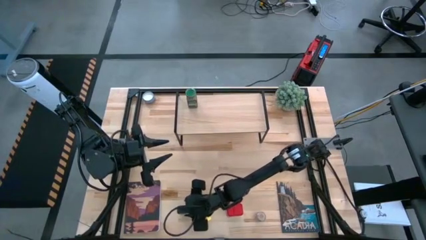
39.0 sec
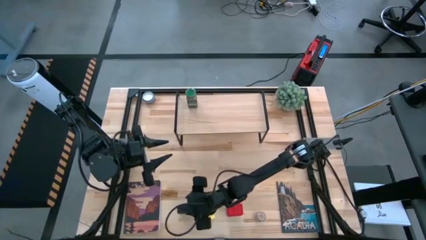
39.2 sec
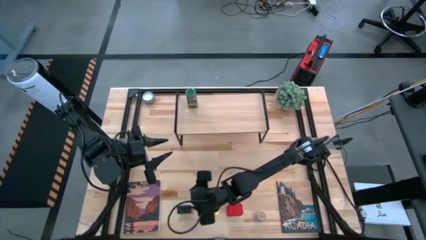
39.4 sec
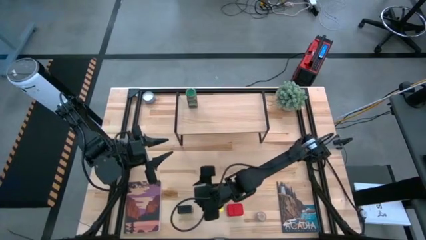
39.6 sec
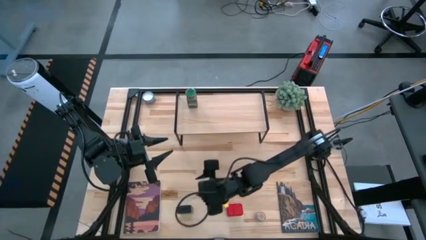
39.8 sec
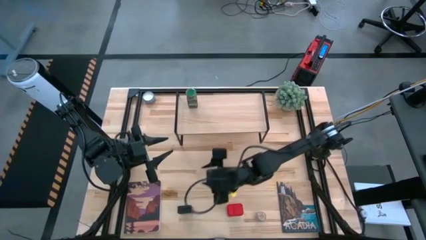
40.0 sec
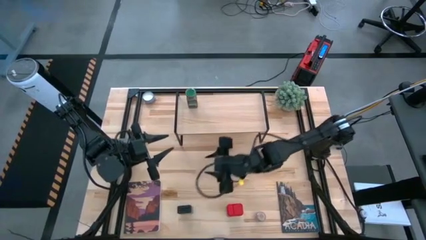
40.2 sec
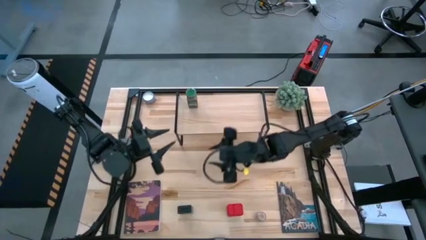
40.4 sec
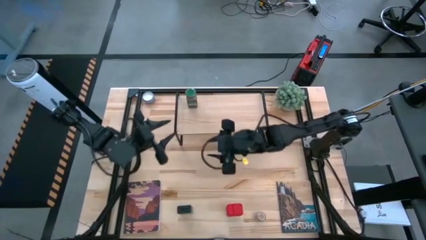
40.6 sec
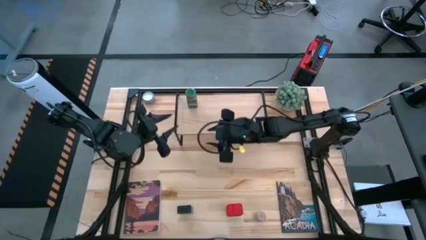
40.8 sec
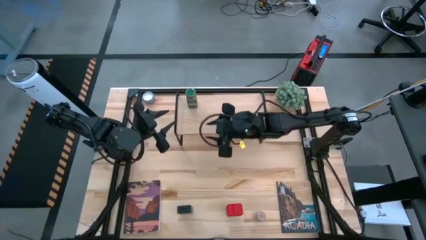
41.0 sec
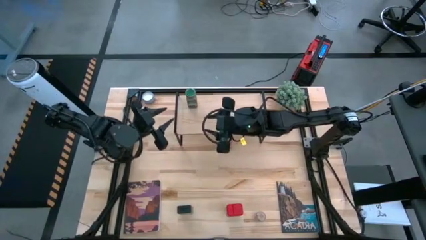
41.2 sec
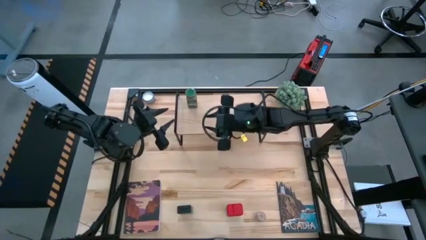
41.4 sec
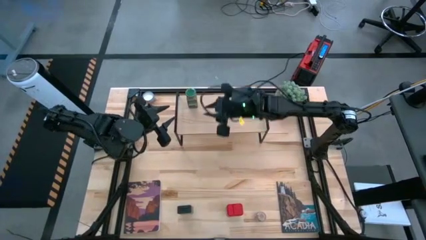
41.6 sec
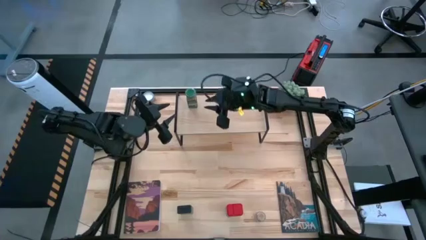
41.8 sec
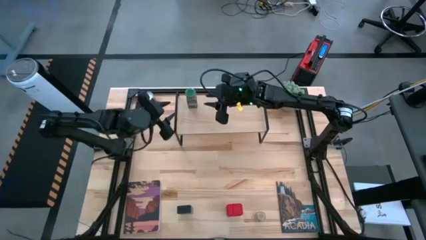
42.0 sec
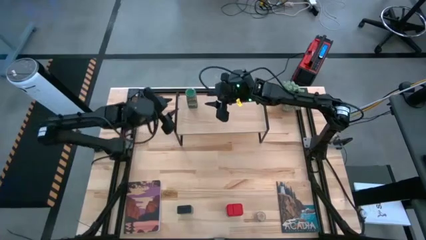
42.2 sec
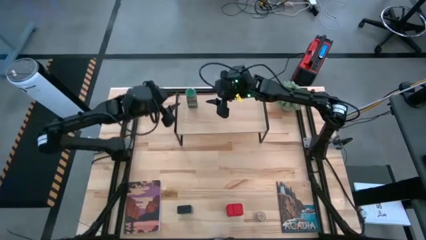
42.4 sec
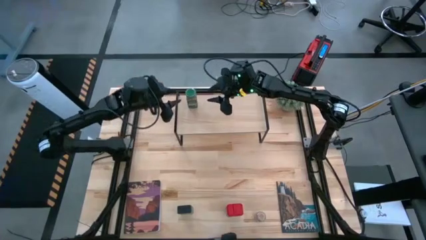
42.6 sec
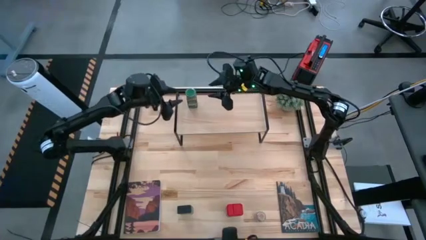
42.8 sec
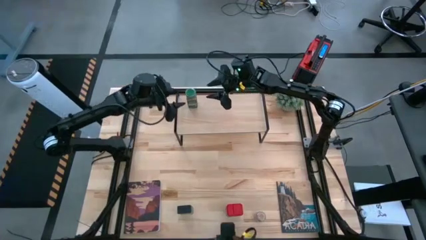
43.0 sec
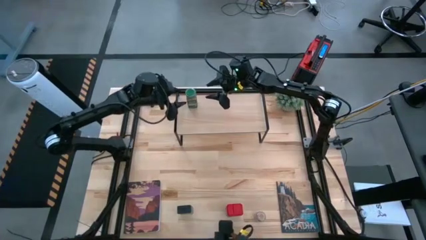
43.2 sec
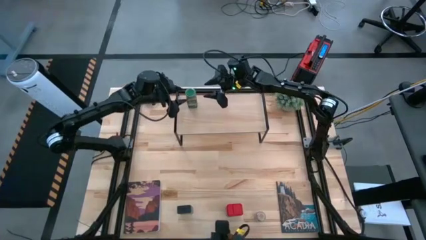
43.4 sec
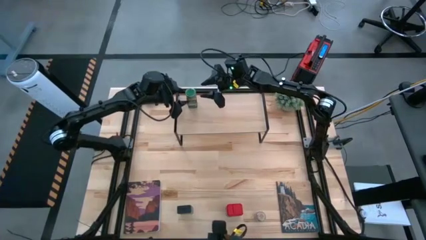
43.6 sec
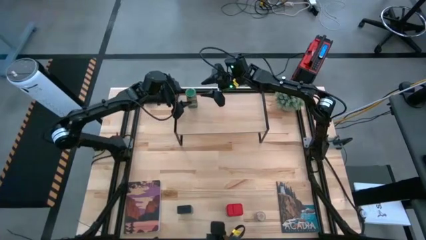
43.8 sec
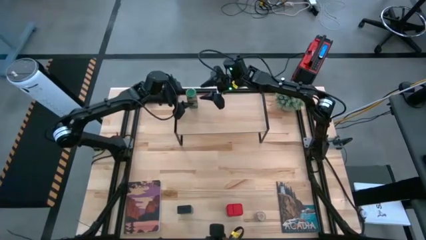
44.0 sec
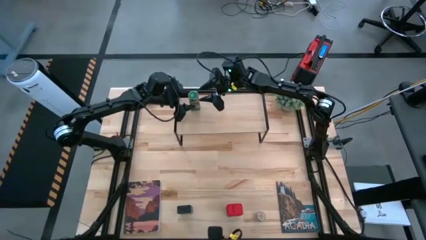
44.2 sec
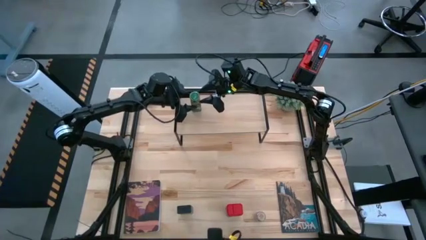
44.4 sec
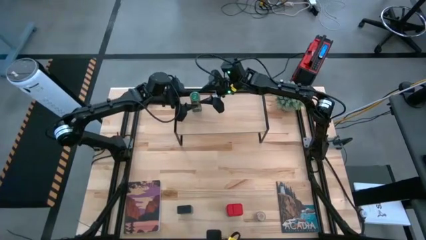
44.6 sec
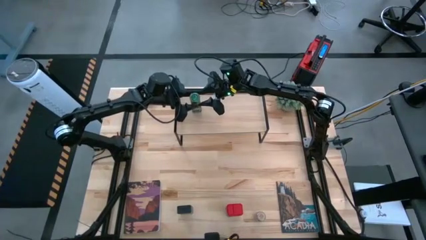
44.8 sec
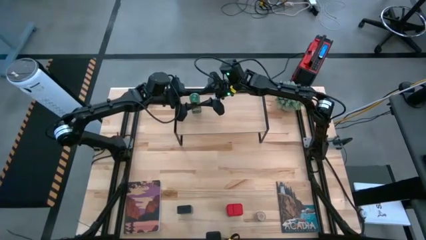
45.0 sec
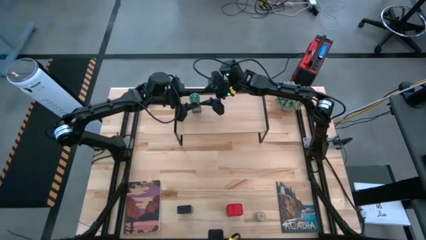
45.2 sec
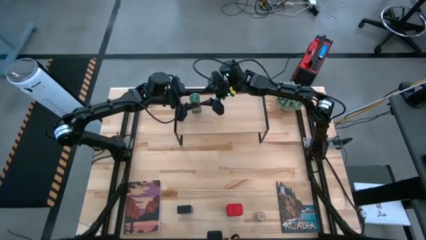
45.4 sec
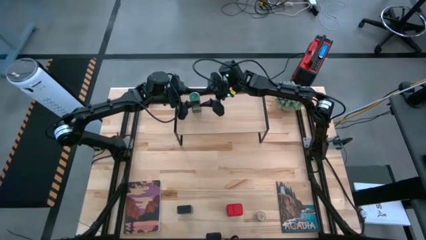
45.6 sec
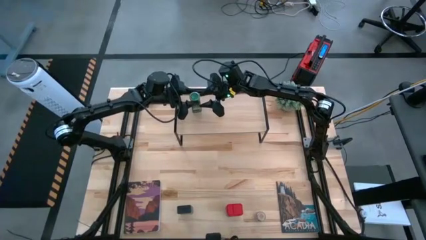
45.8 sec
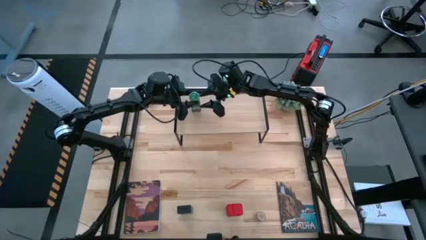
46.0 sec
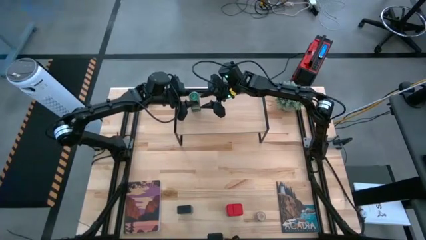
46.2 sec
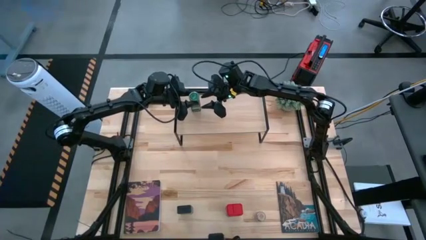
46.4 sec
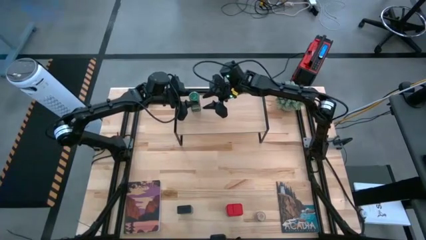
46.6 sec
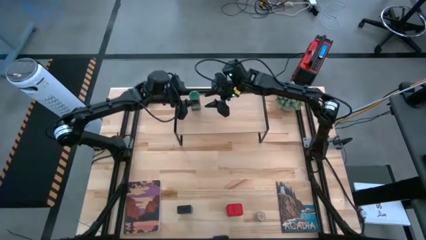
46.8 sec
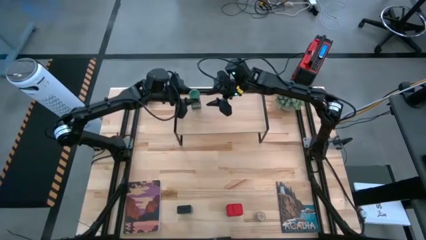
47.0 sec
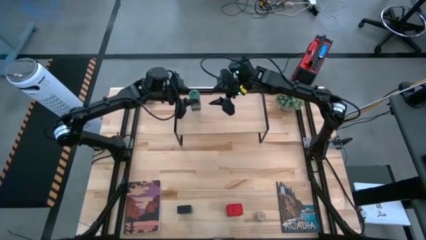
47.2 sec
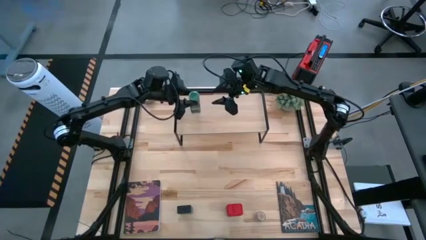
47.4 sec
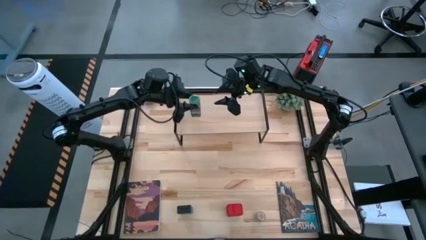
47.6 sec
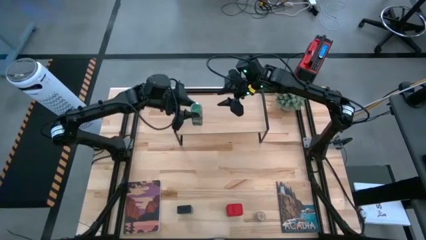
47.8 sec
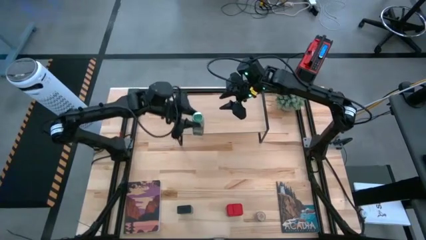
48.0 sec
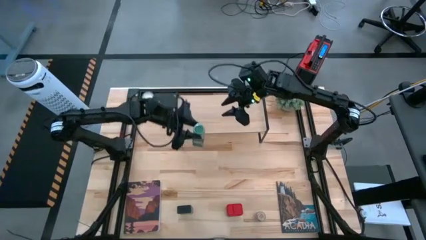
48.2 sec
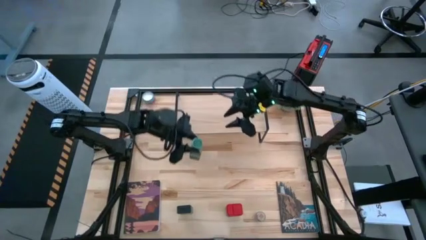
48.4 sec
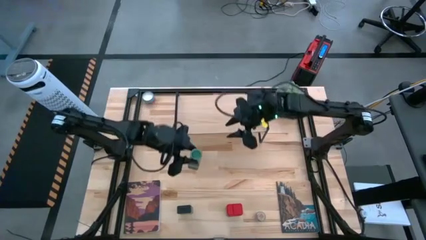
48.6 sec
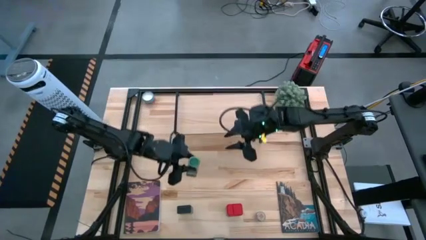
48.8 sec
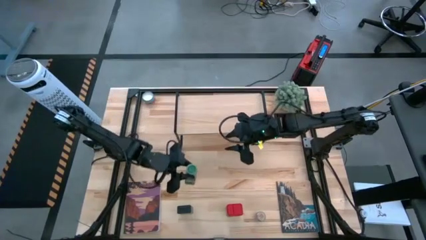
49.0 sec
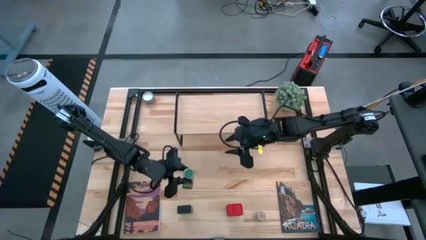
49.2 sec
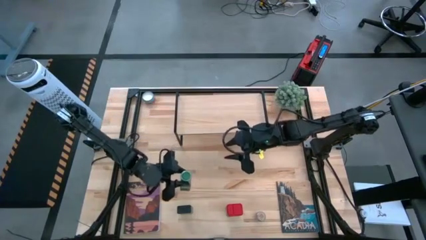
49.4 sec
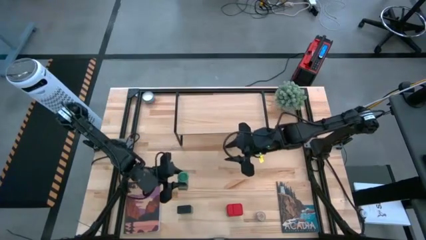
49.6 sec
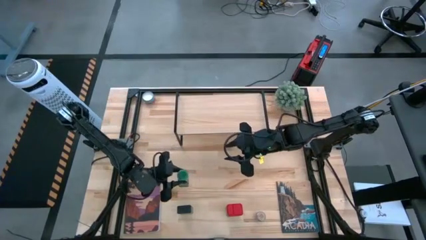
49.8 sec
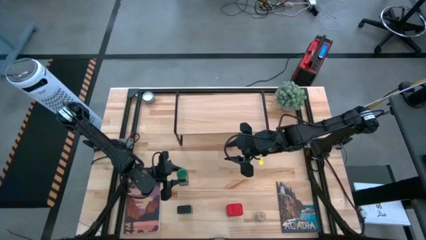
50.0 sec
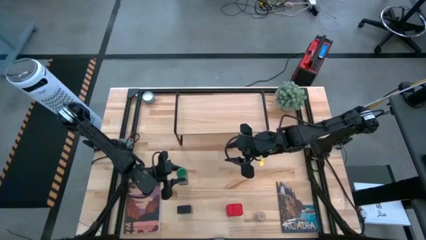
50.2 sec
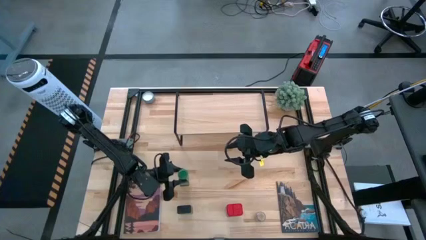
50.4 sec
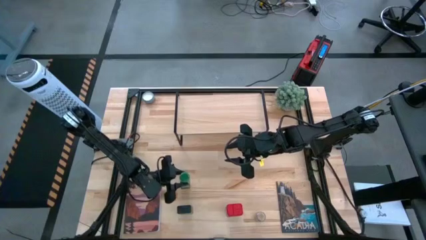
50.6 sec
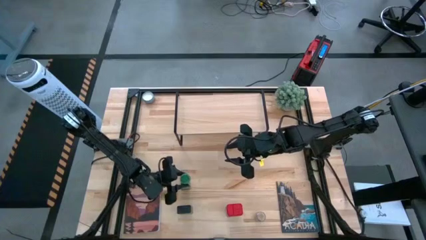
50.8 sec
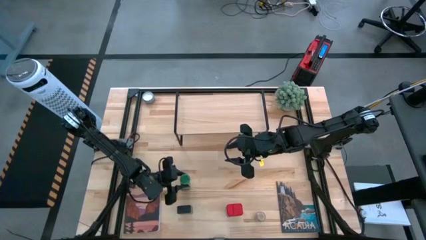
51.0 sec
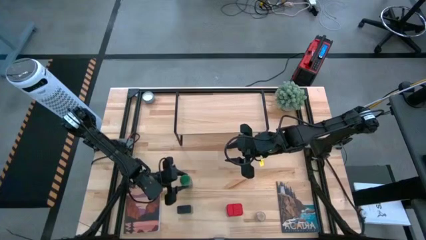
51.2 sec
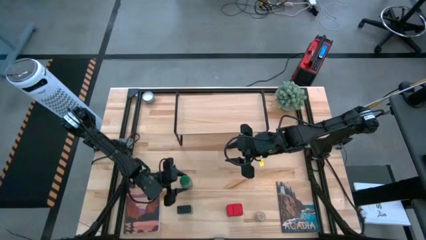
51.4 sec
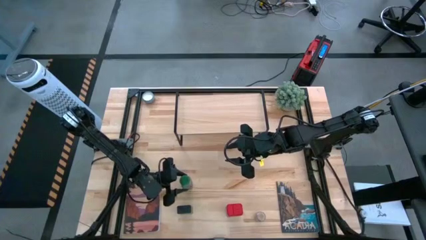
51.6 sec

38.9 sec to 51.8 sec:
Task: Shelf spices
Remove the green seasoning bottle from the shelf

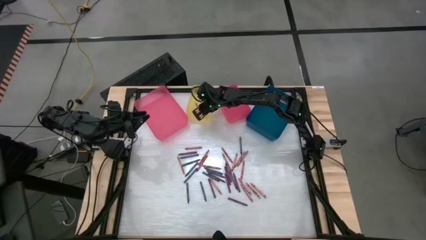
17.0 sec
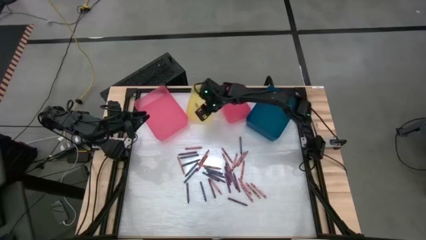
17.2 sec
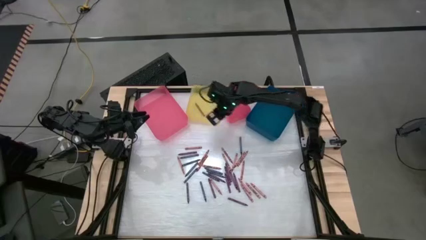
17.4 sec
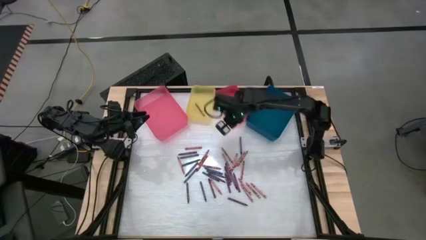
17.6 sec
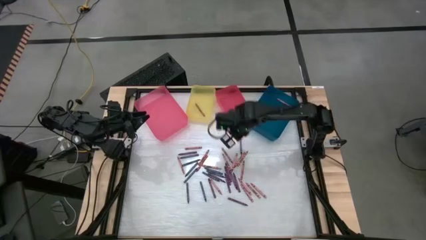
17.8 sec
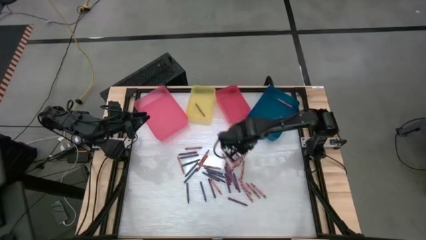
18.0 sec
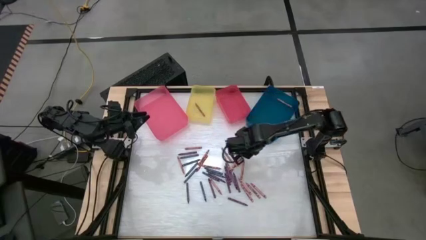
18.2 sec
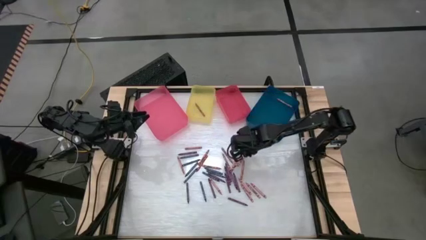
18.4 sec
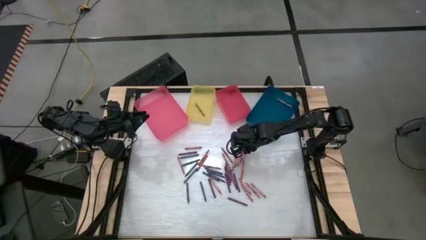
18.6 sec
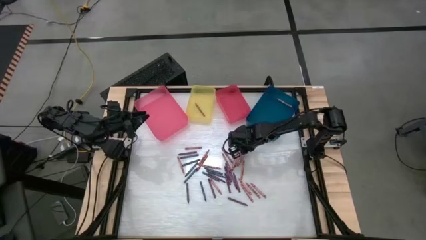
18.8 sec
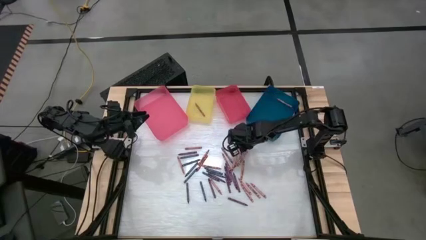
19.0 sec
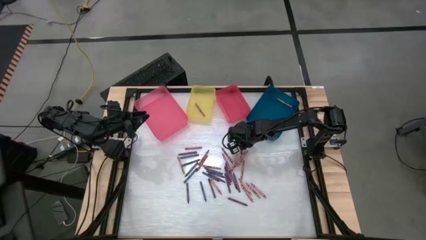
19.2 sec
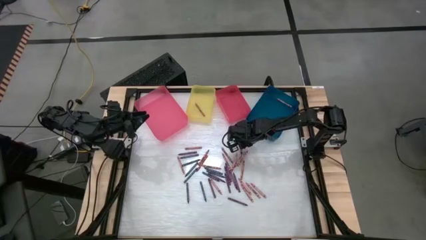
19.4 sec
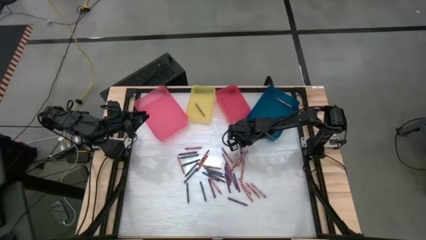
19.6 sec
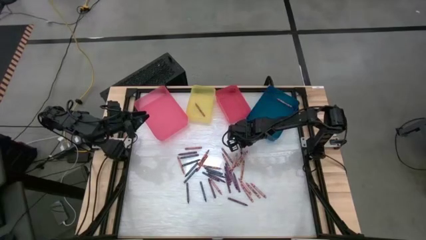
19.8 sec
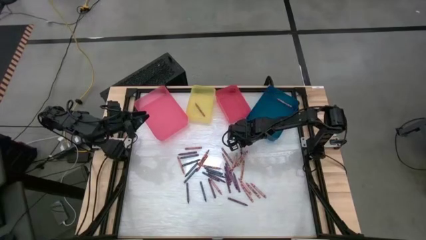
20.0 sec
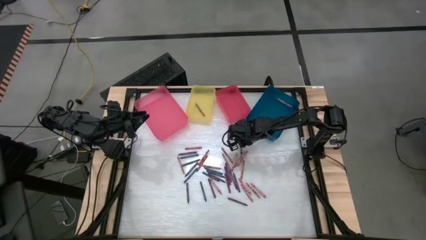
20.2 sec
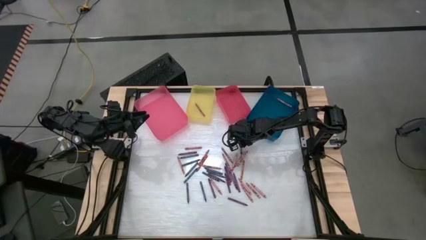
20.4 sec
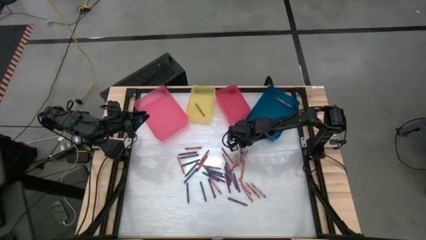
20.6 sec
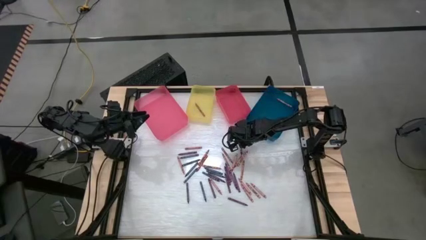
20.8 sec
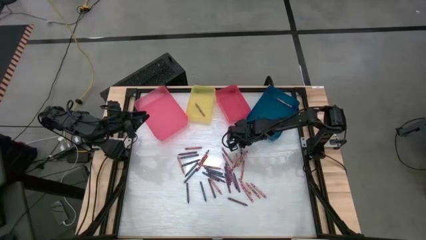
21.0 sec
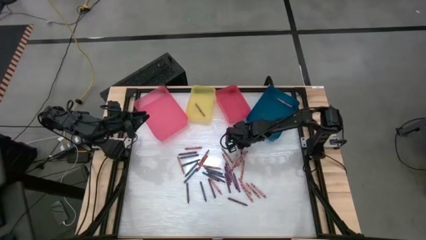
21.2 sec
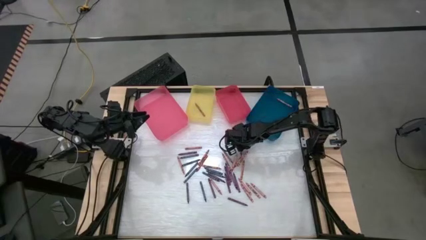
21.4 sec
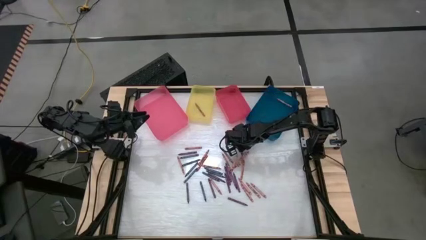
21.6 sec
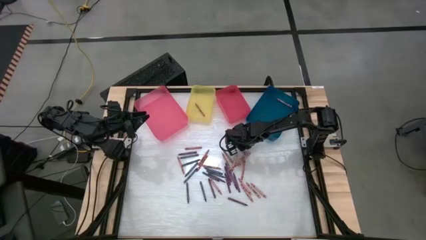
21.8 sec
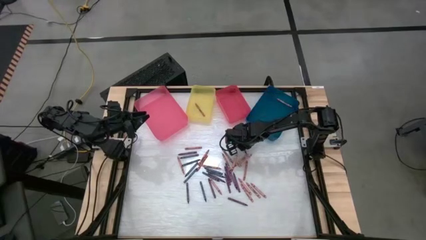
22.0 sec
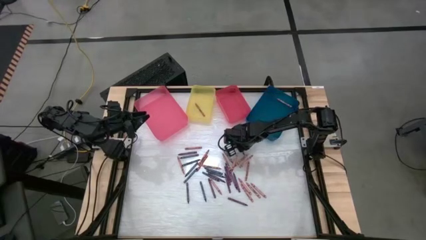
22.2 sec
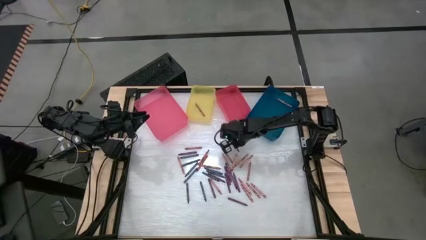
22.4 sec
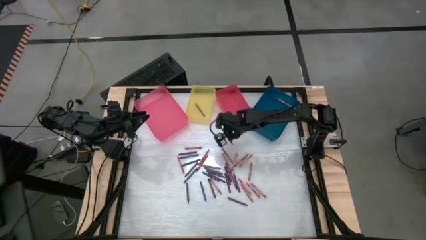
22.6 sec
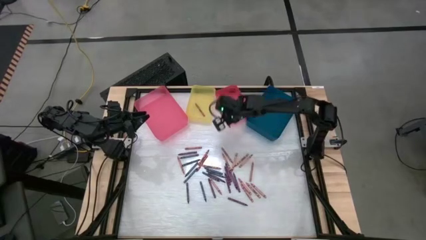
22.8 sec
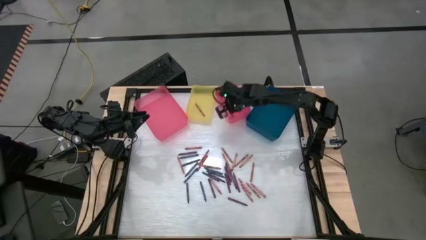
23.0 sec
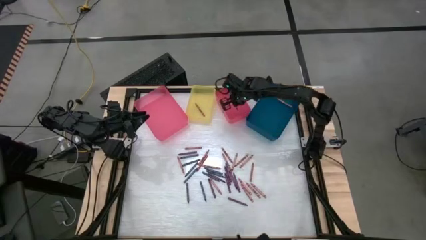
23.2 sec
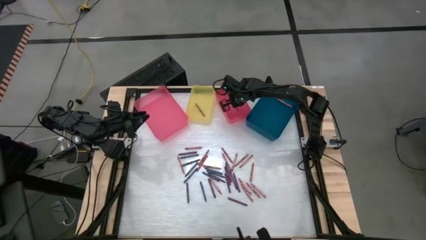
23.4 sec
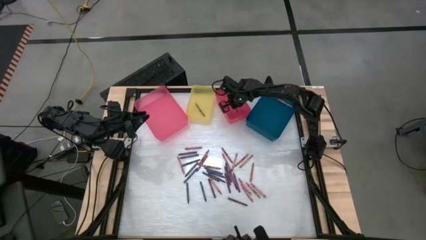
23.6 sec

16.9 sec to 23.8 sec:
Task: Sort crayons
Put the blue crayon into the red bin
